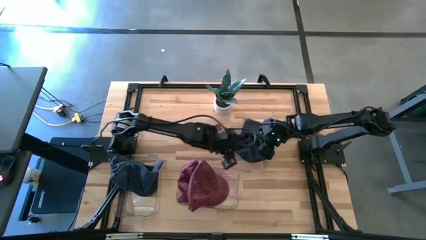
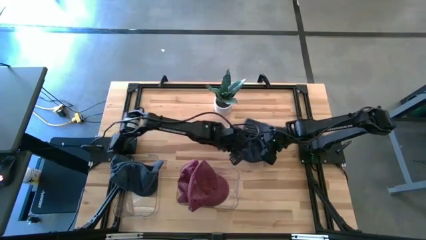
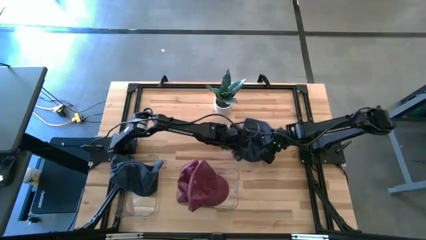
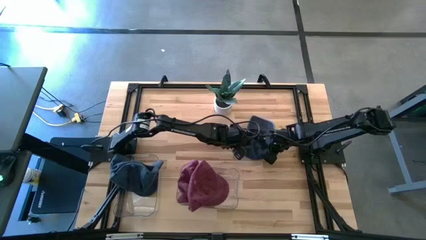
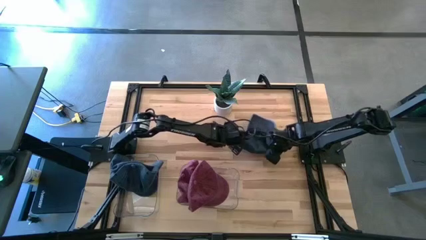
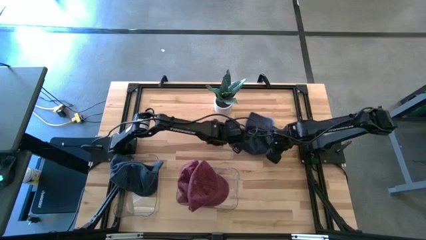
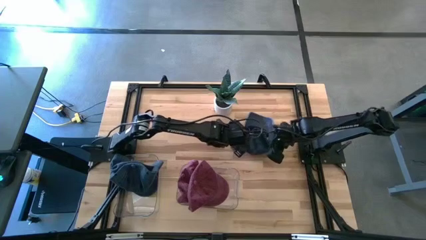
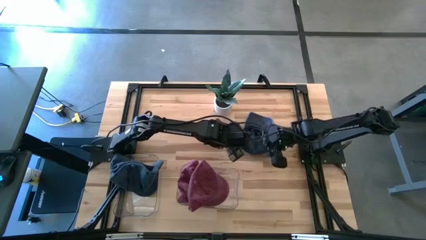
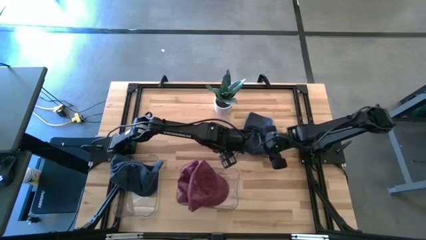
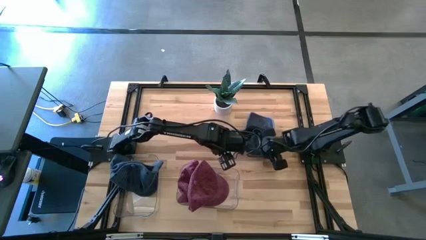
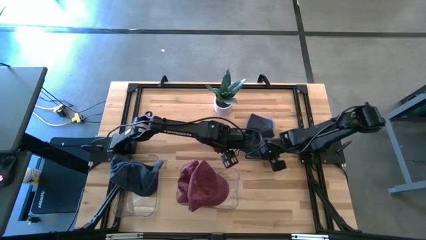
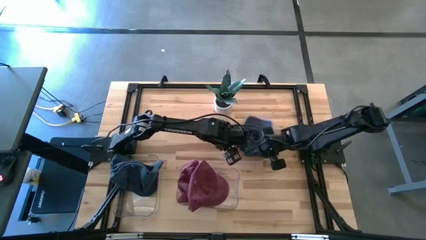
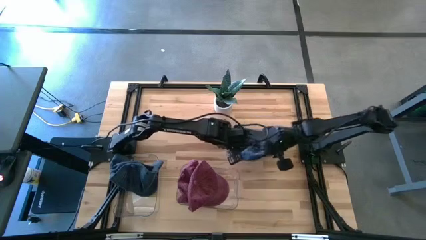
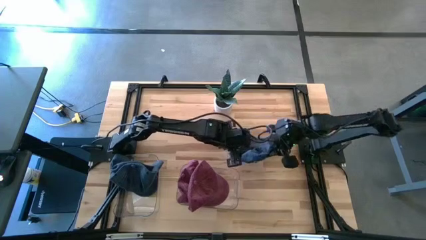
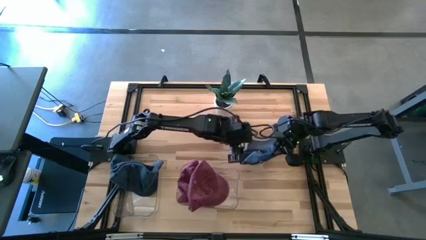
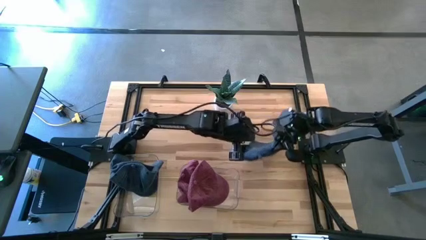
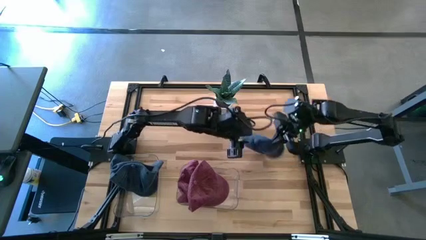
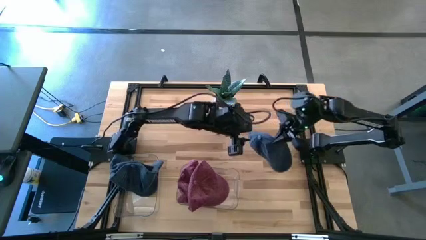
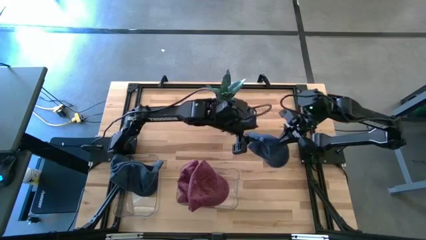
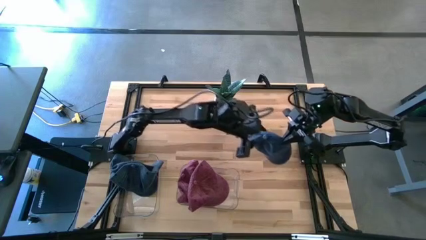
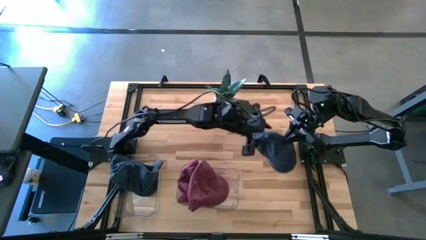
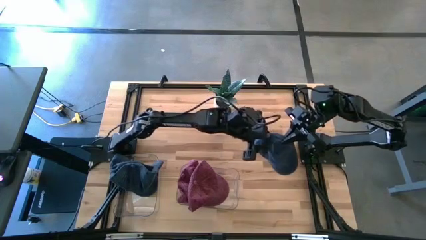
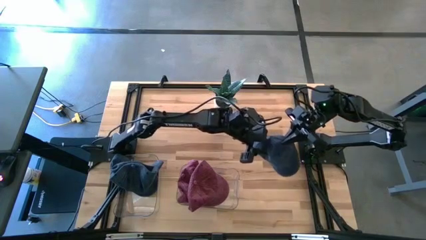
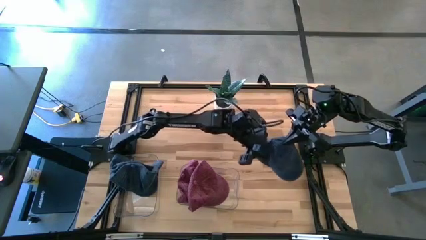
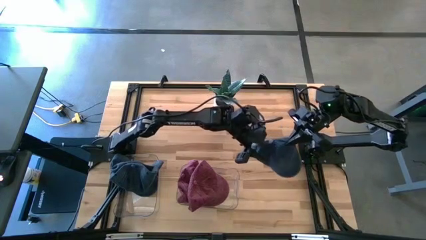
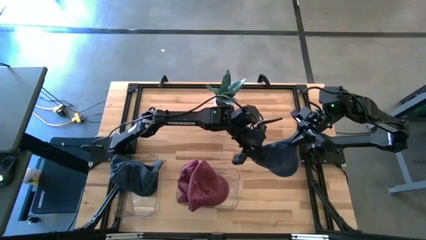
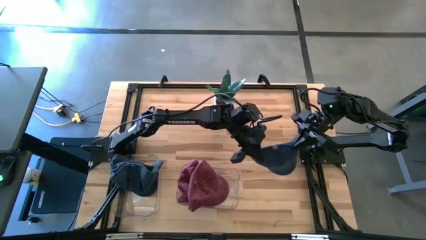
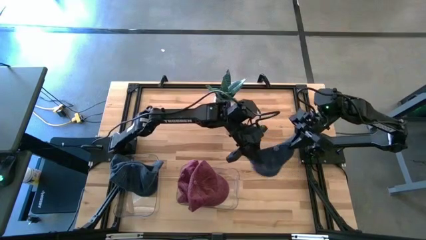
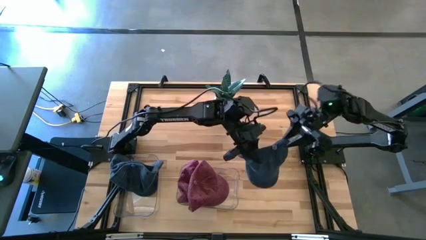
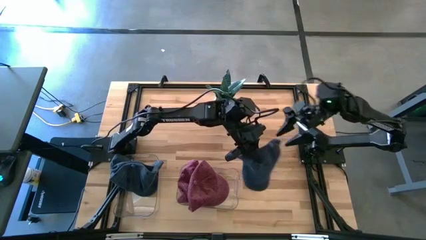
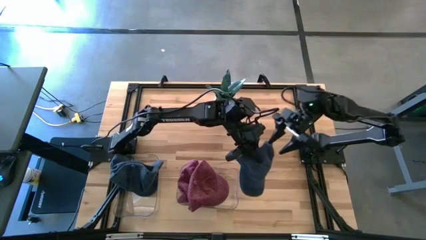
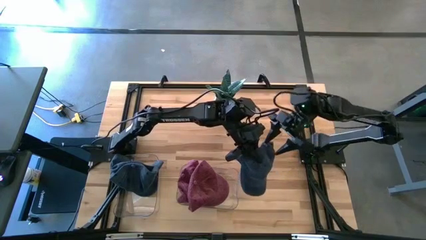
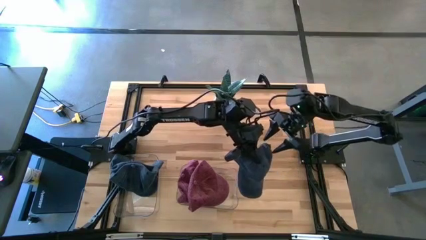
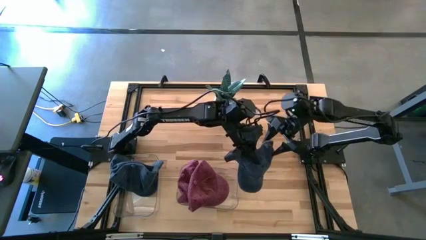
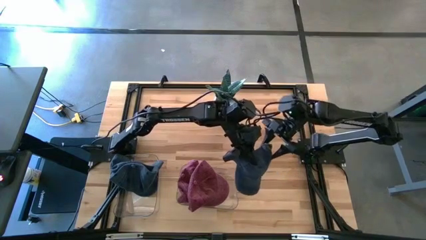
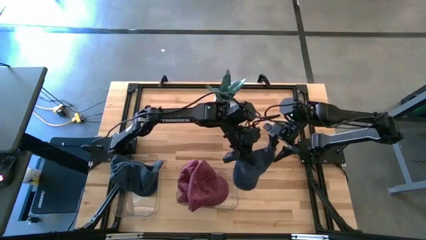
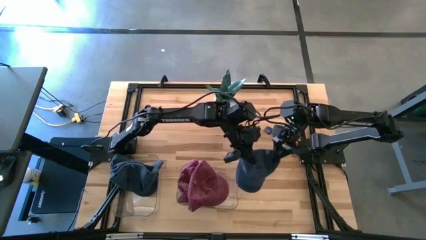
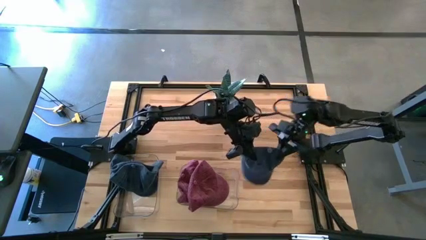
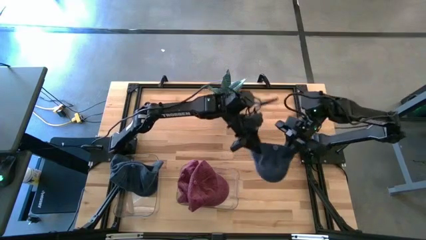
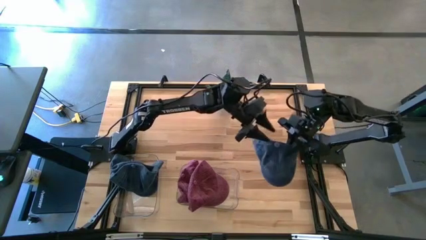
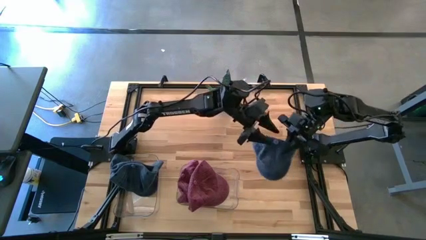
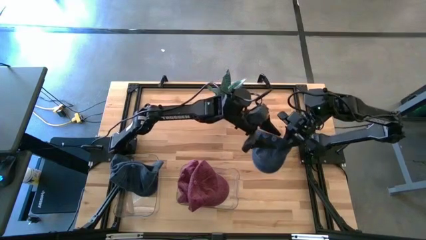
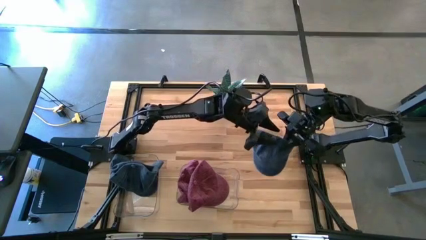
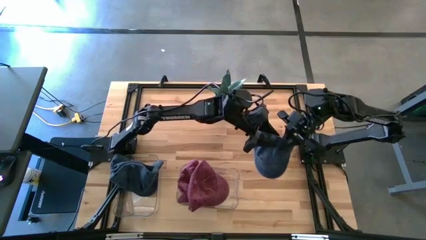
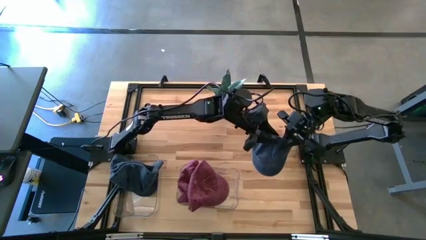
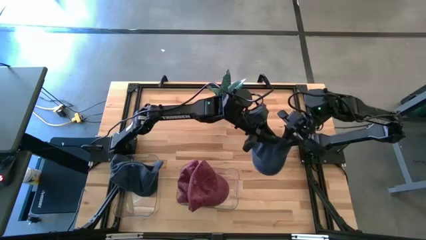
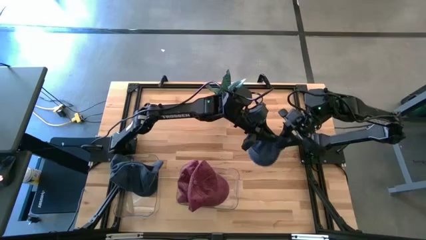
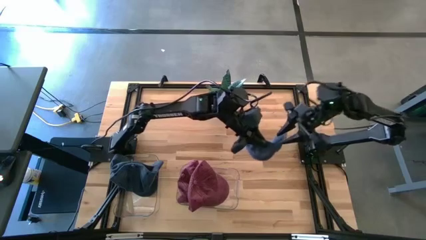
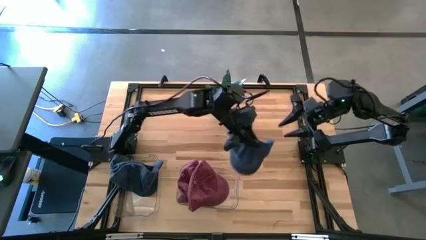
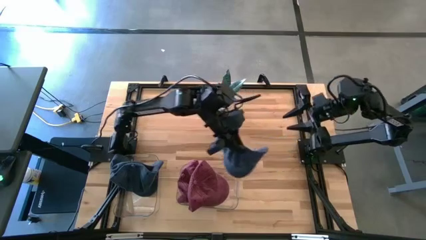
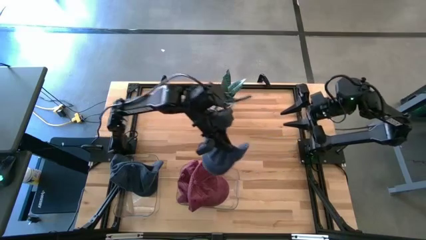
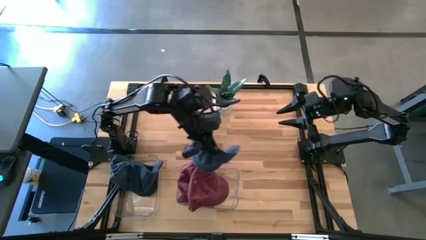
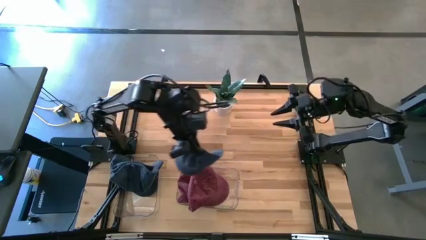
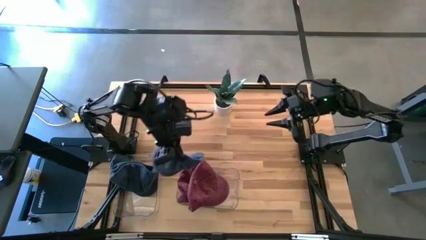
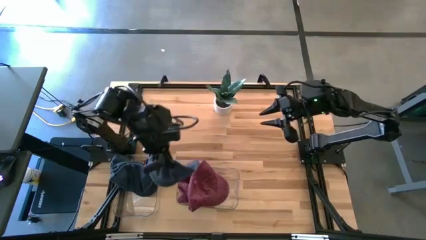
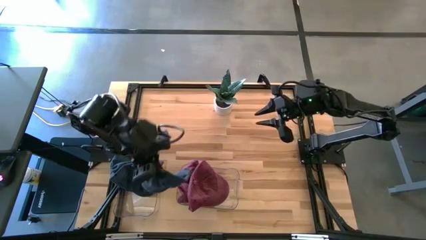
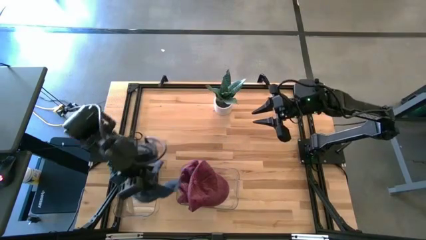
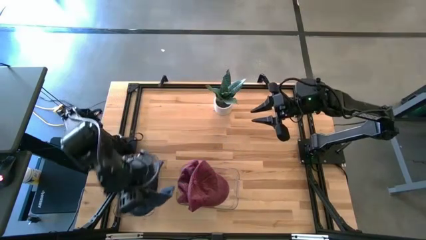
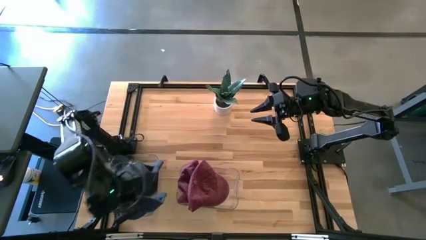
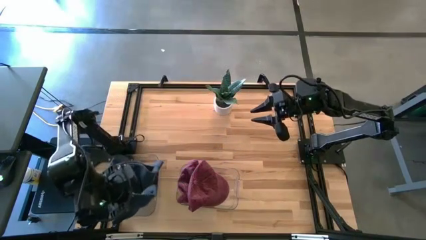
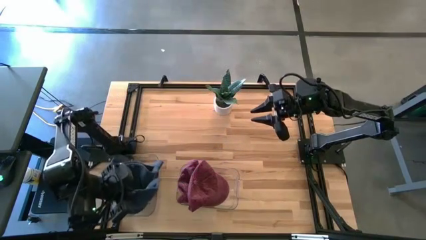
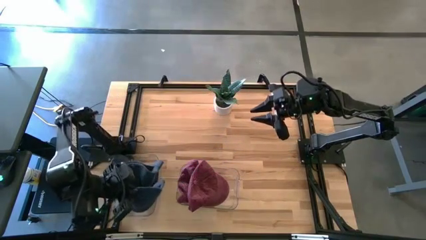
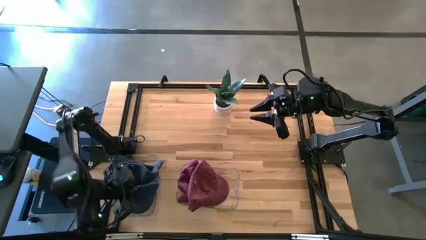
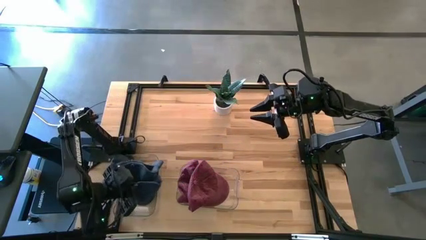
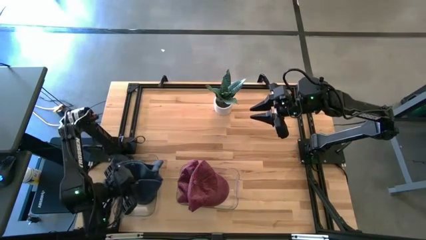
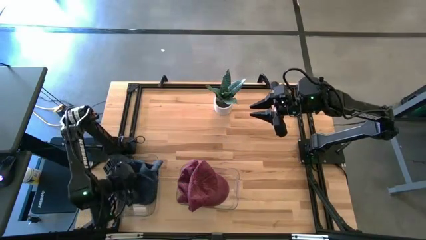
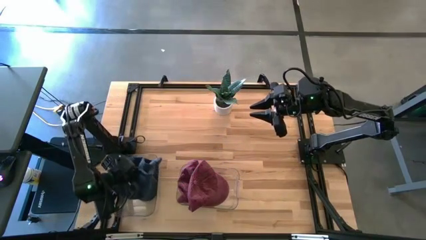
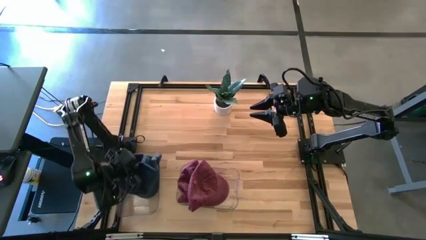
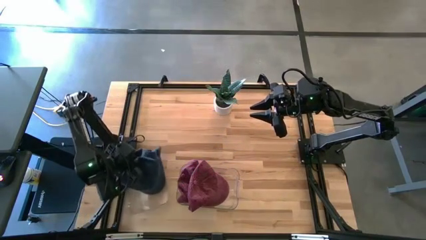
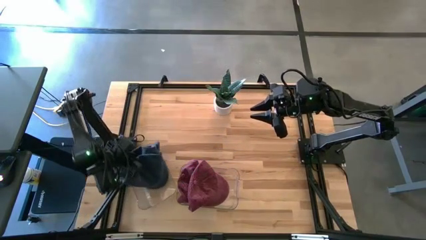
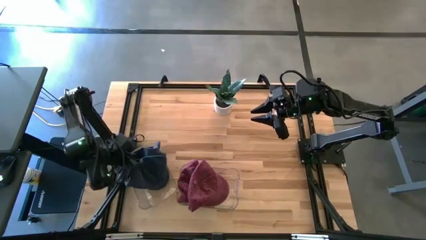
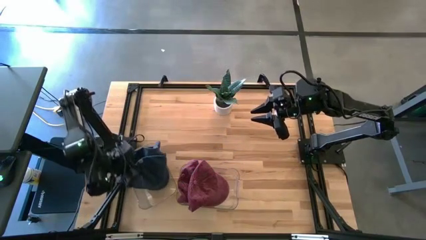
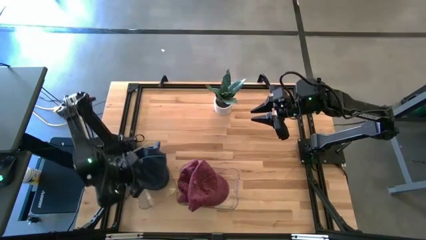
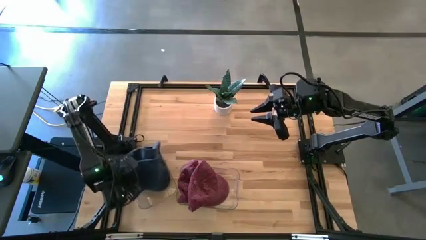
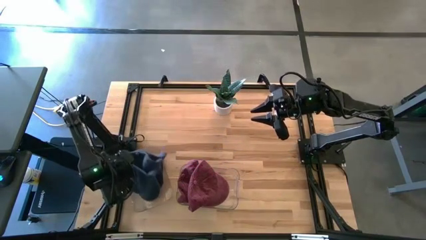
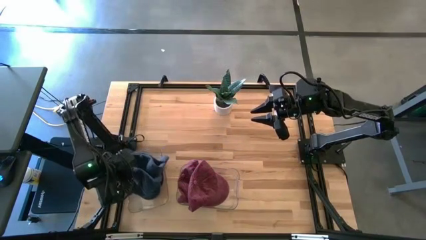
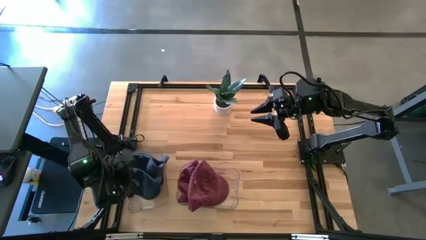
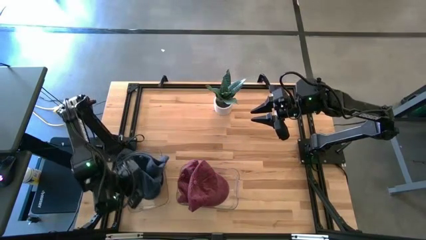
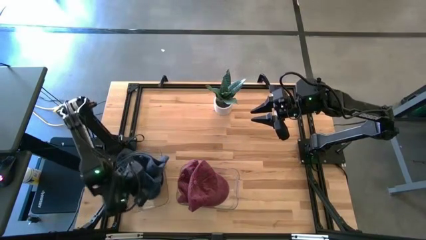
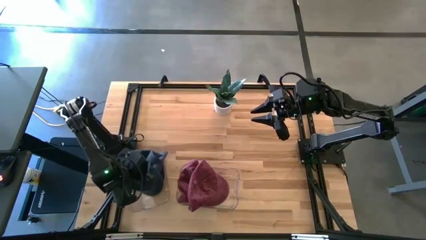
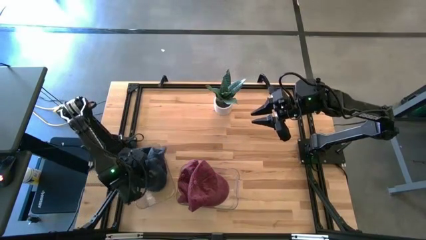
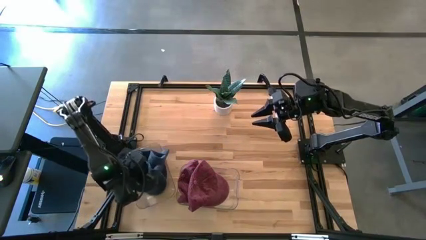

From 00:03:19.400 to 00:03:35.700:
Task: Pick & Place hat
Put the blue cap into the left transparent bin

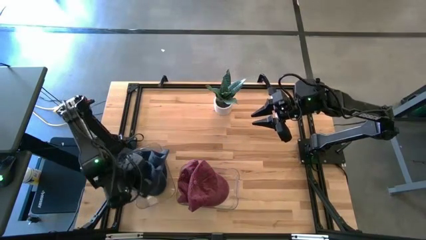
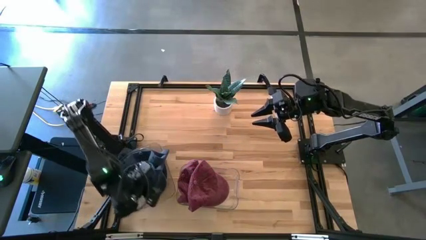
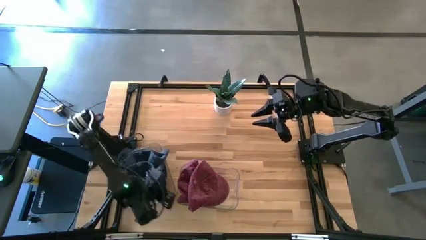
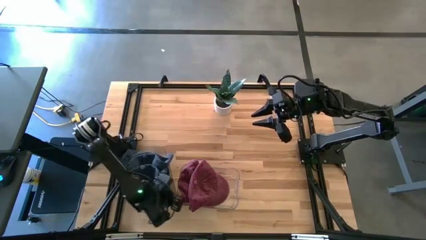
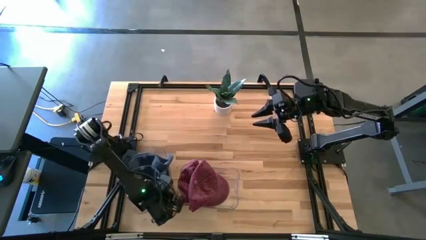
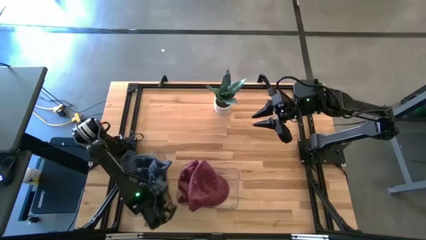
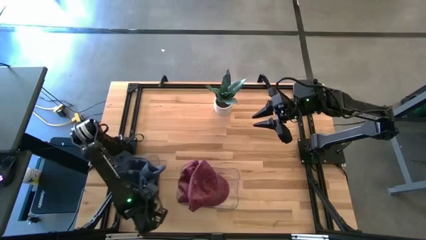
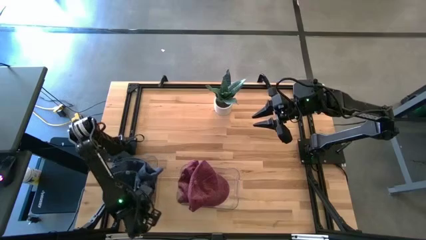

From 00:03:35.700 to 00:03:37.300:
Adjust the left transparent bin on the table
